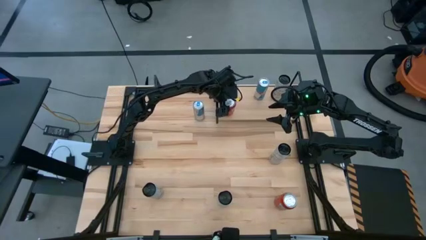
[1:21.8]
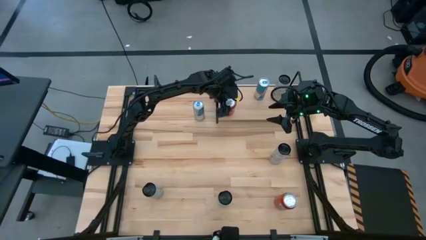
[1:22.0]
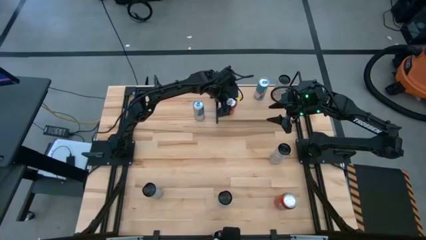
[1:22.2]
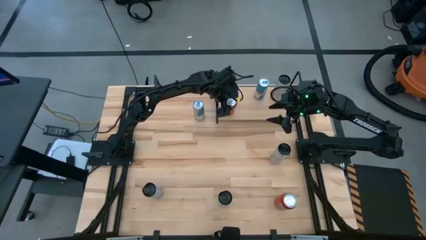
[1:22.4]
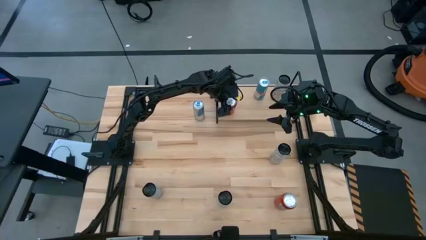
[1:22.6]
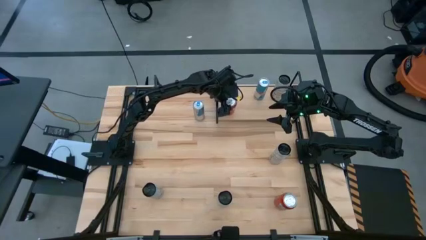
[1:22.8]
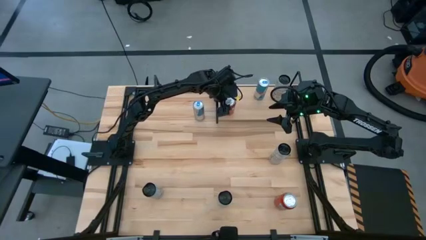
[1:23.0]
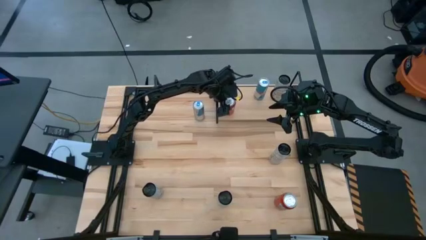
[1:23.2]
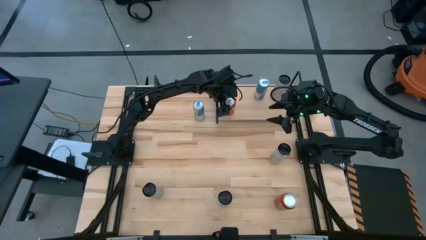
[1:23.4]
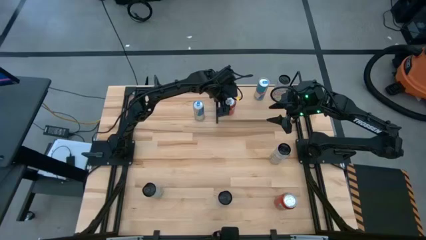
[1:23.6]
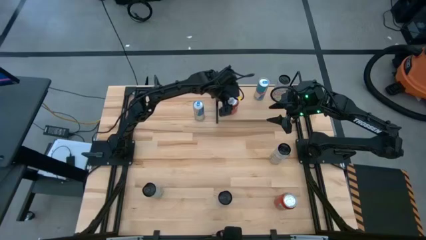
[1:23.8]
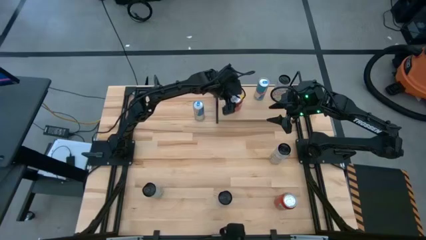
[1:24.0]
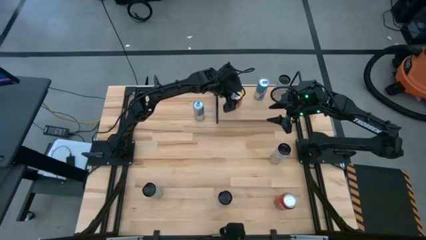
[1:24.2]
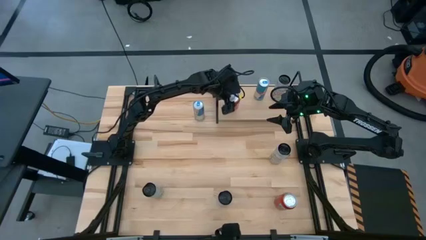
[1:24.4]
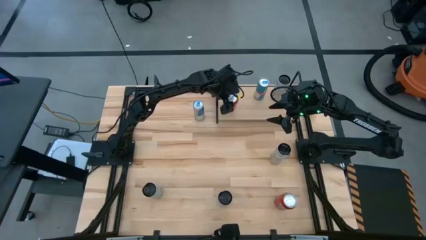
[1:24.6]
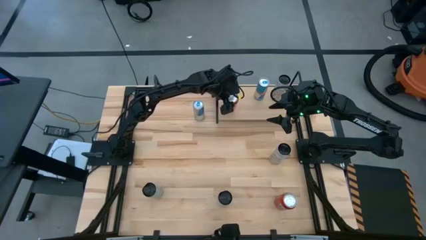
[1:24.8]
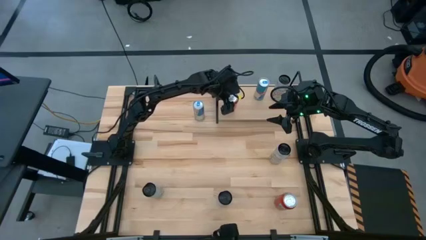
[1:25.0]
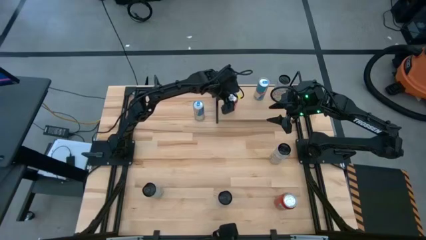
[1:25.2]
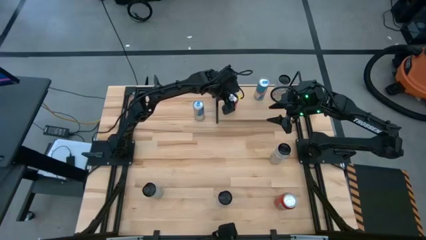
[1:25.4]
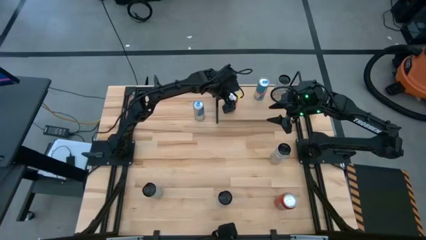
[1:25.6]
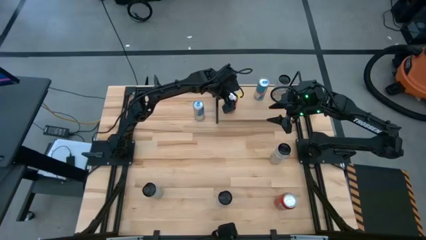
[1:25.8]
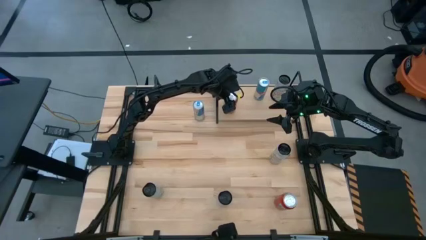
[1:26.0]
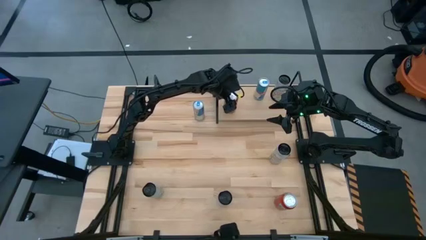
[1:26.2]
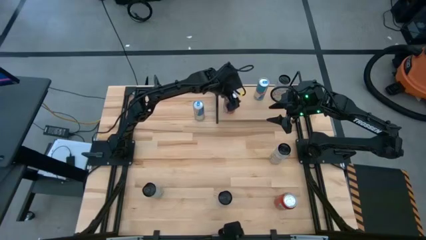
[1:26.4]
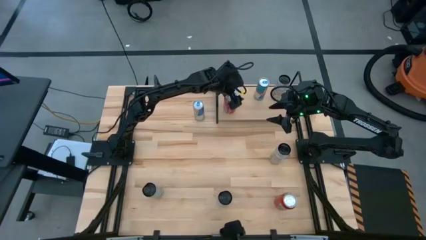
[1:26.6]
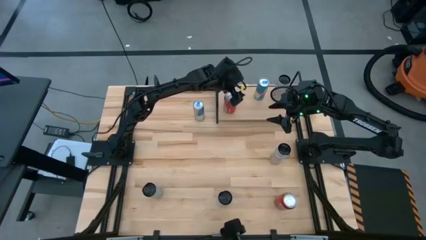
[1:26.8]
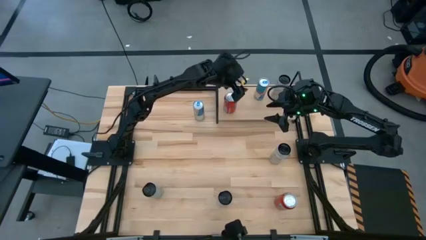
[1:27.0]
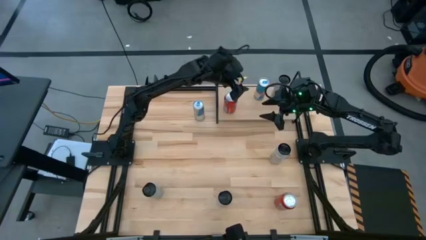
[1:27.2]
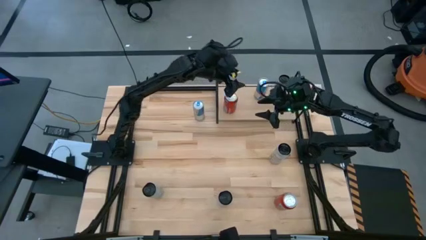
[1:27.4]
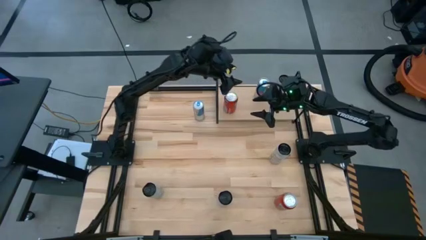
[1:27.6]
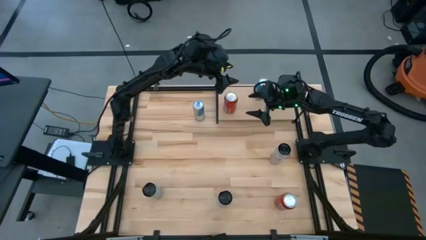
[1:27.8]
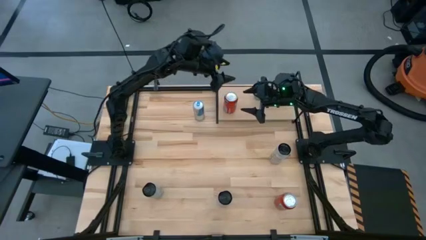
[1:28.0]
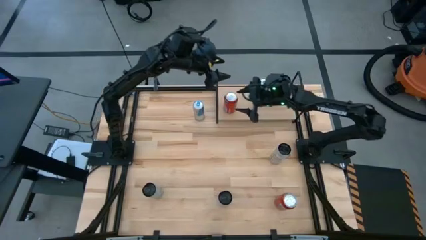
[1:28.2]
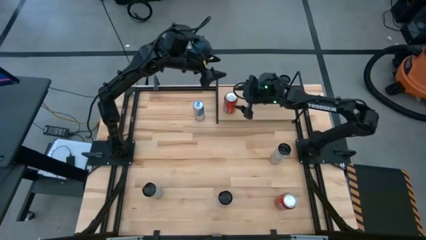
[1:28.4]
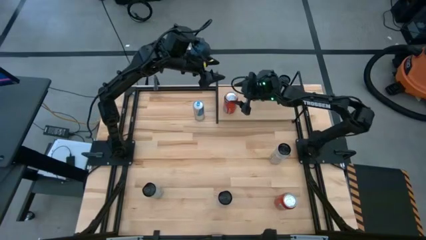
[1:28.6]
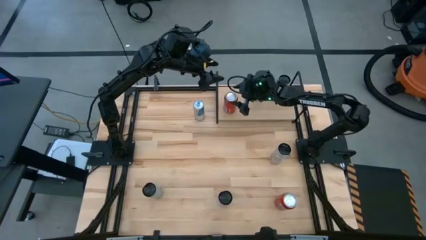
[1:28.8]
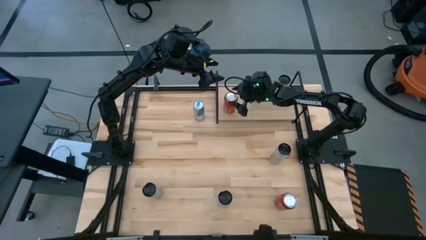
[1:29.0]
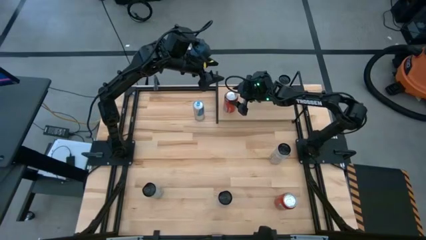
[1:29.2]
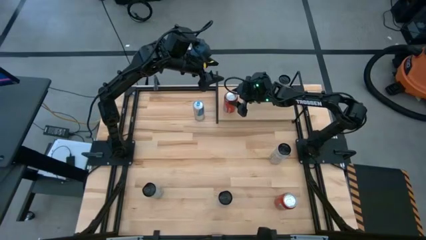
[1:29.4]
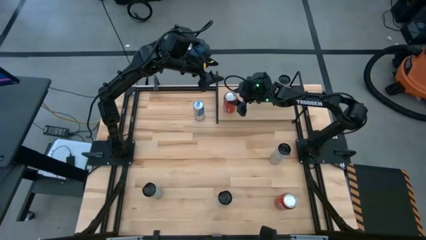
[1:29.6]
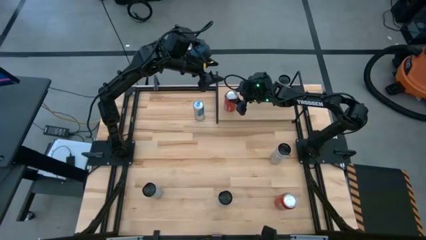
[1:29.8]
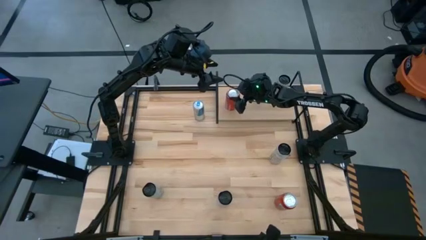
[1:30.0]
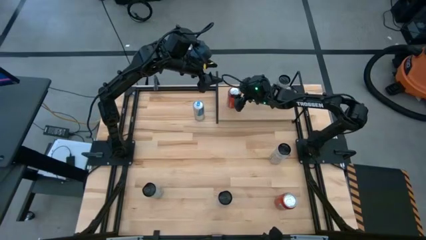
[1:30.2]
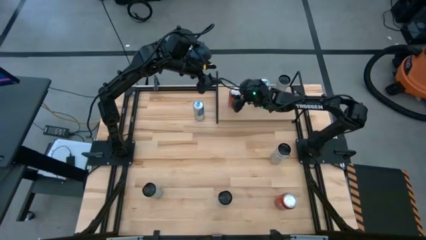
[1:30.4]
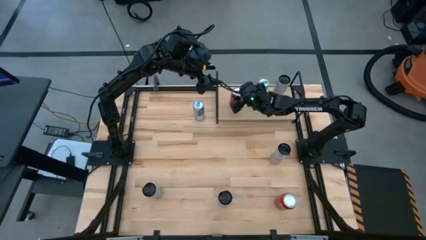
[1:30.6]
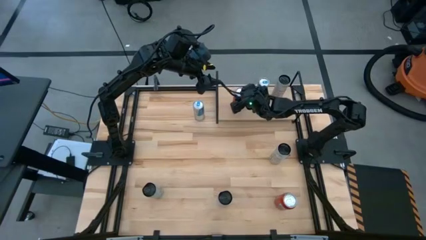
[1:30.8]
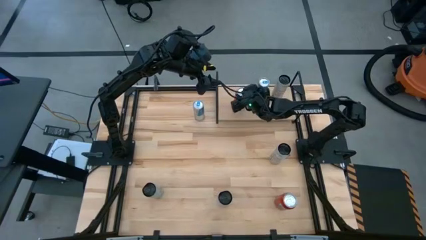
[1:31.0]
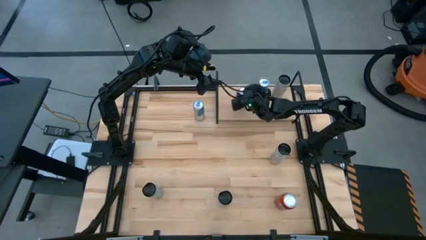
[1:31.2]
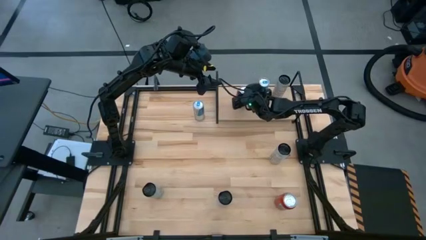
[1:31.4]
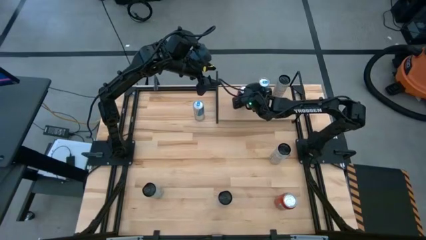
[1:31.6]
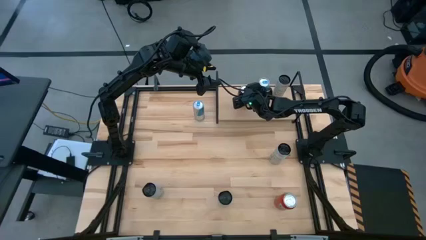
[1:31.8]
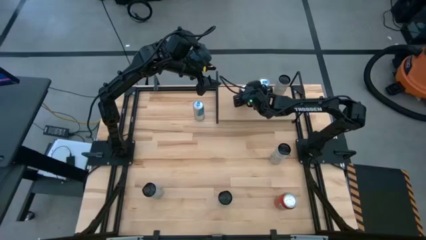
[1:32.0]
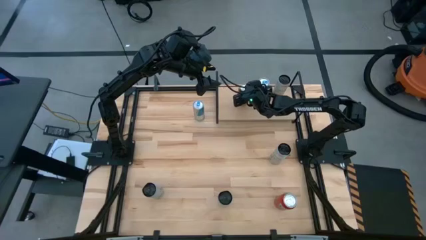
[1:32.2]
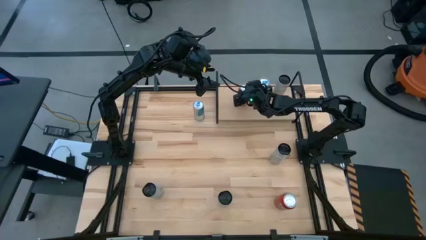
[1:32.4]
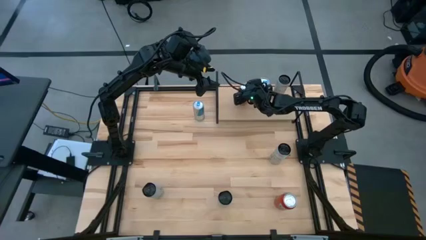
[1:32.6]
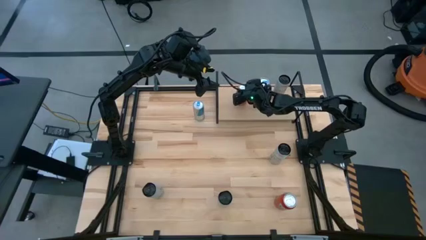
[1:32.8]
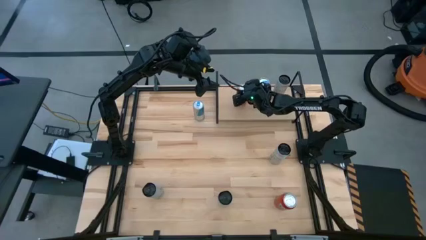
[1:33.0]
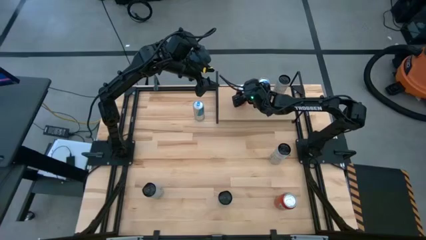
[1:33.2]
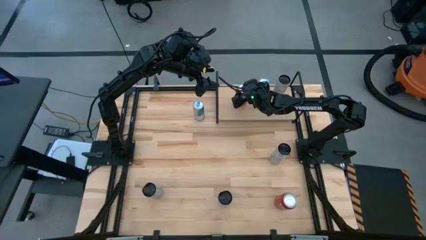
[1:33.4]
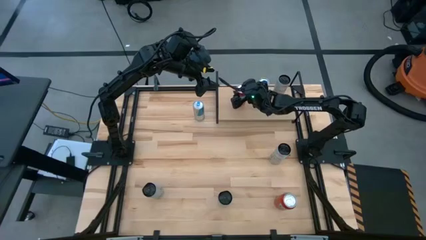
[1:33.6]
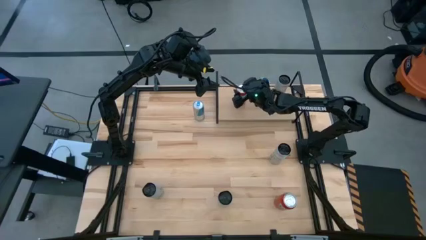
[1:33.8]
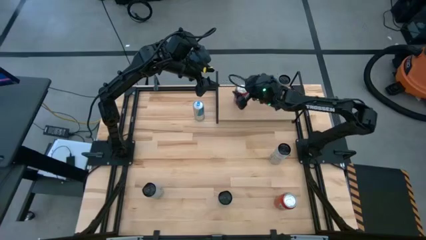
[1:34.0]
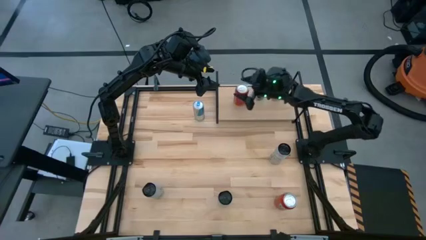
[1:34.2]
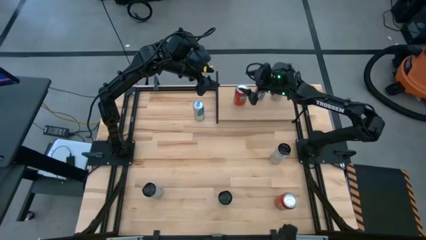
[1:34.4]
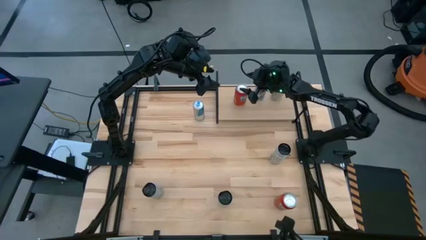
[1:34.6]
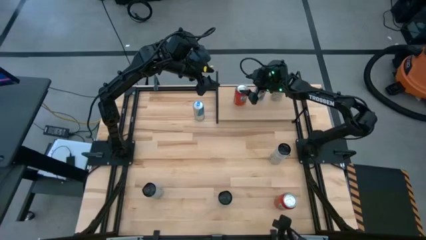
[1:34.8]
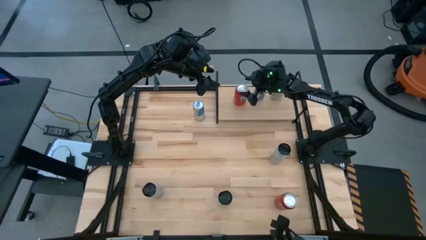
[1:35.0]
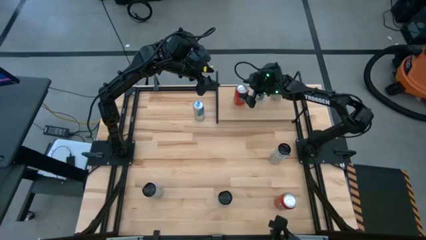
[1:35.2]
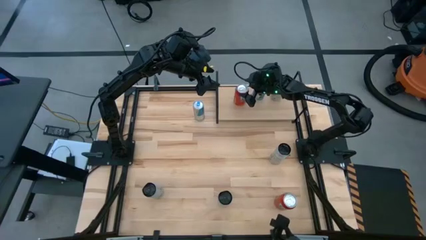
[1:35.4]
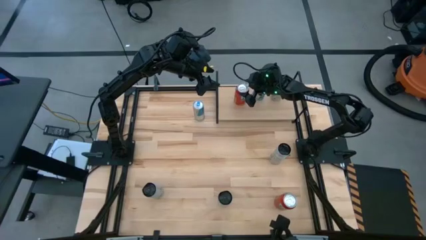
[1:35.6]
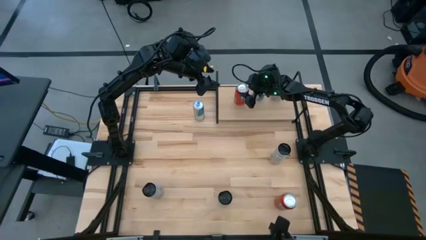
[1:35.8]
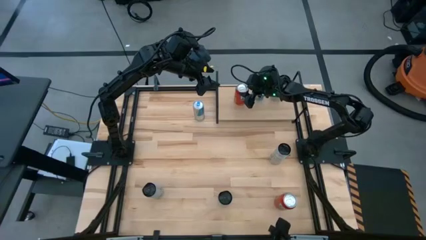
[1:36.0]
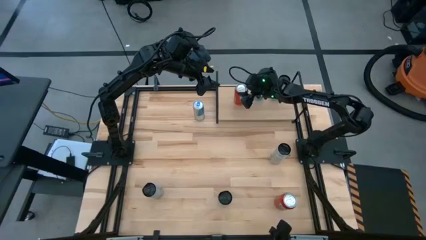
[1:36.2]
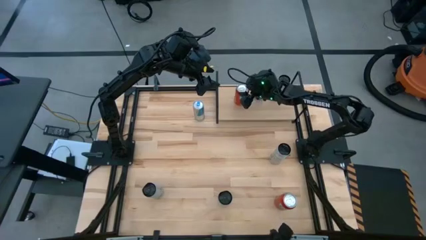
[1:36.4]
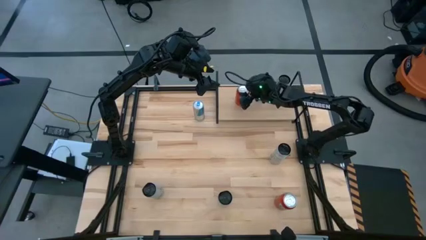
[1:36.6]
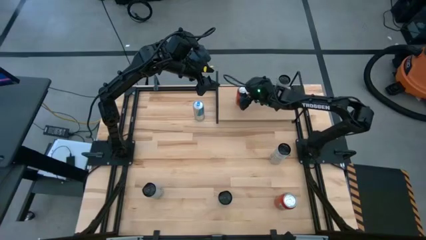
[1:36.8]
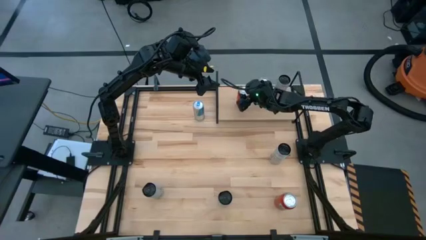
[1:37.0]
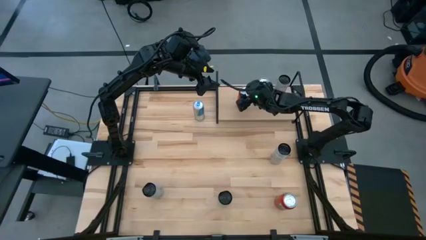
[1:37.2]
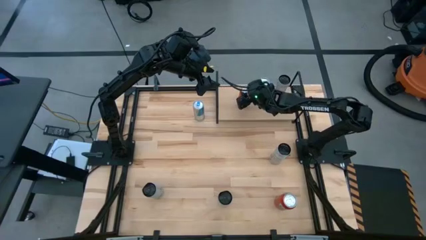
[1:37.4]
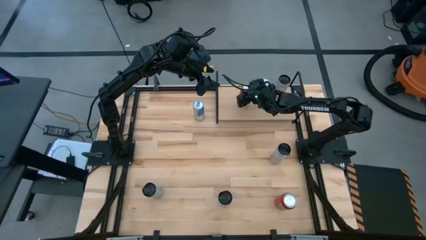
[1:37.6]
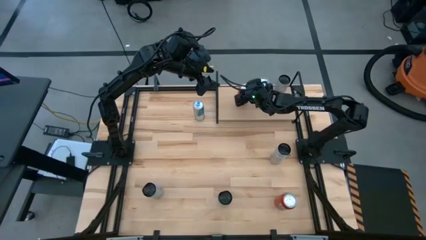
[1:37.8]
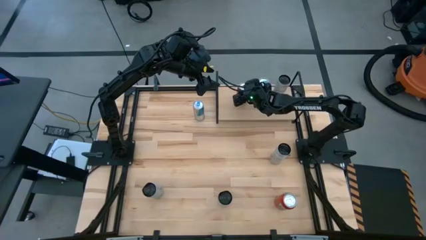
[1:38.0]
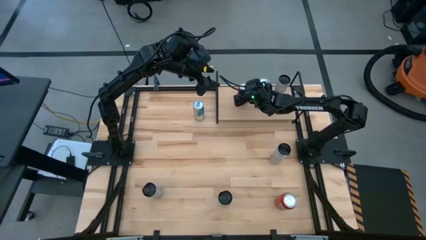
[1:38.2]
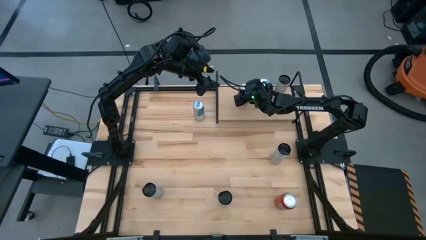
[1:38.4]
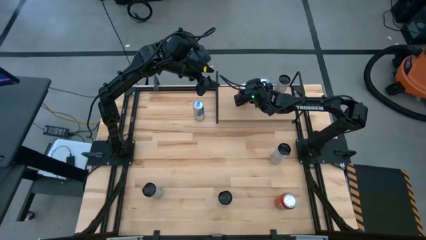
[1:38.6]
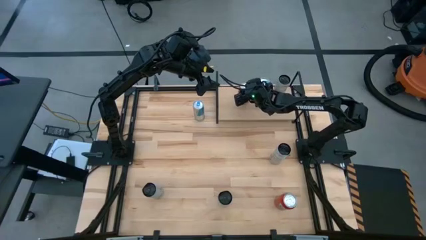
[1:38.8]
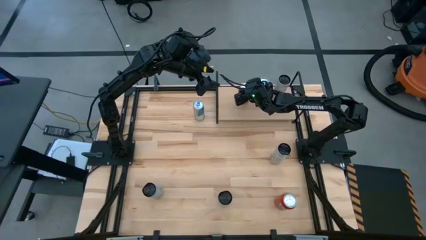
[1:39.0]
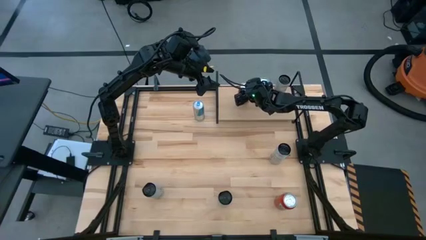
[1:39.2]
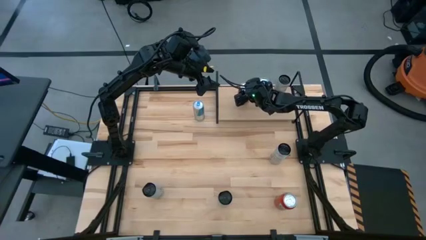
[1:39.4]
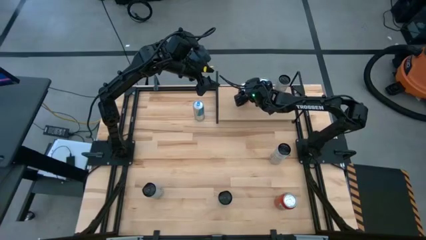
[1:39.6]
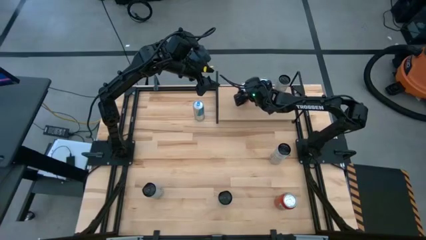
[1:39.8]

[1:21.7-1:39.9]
Task: Place canned beverage on shelf
Put the left red soda can on the shelf
